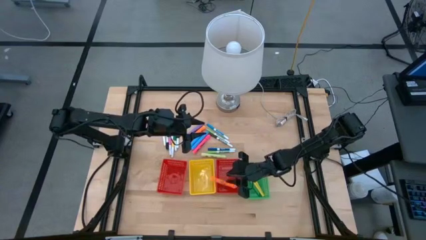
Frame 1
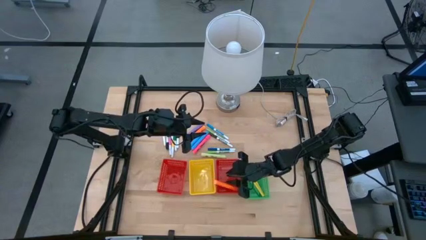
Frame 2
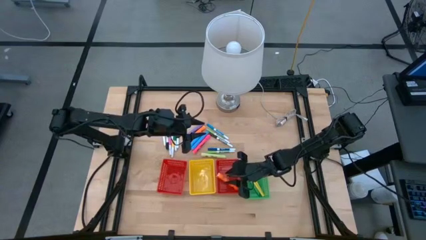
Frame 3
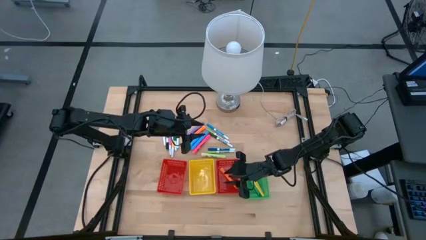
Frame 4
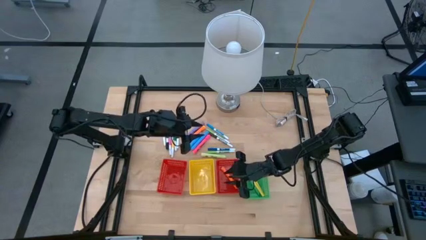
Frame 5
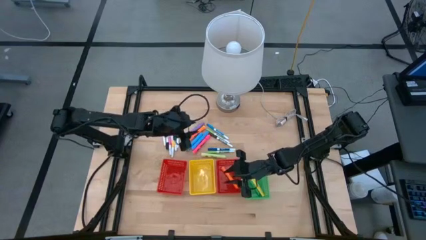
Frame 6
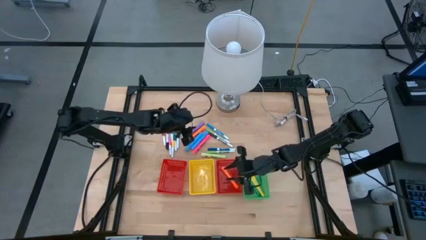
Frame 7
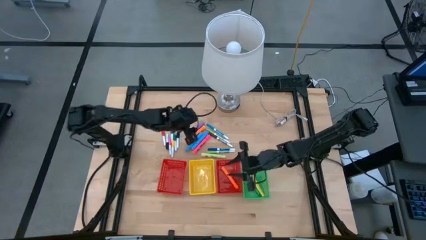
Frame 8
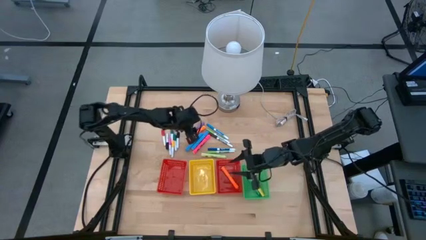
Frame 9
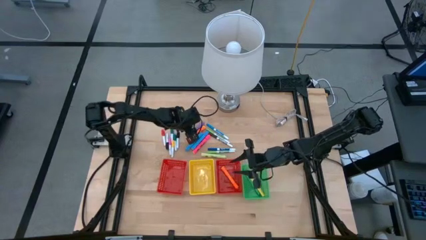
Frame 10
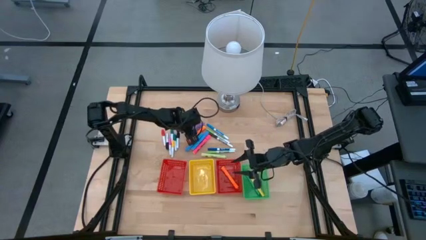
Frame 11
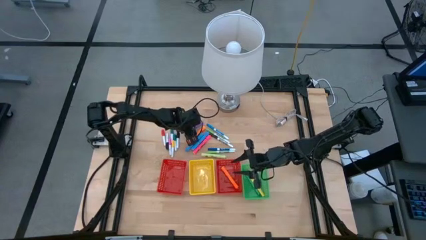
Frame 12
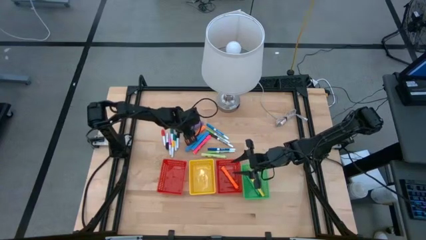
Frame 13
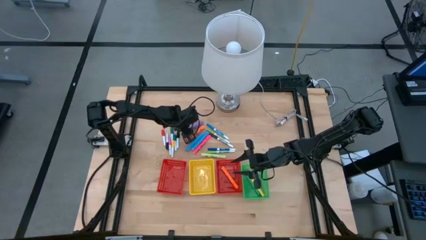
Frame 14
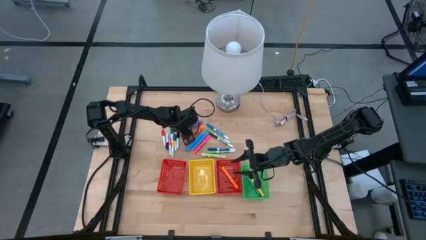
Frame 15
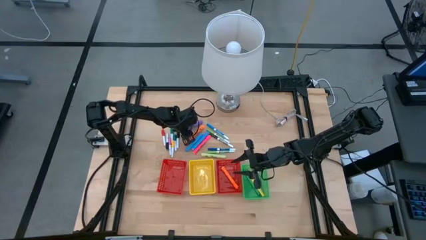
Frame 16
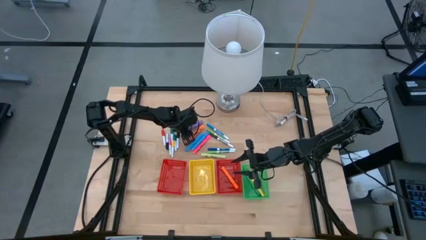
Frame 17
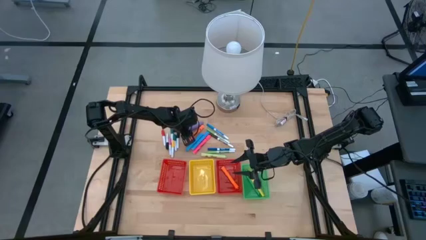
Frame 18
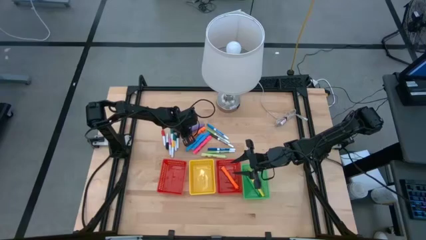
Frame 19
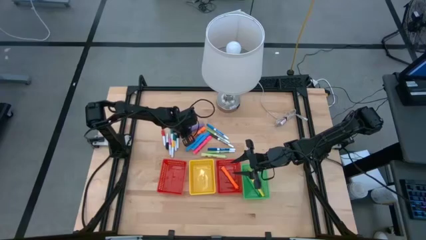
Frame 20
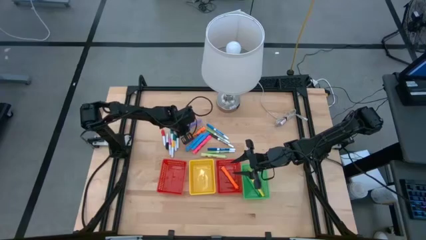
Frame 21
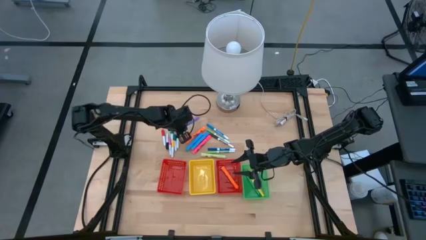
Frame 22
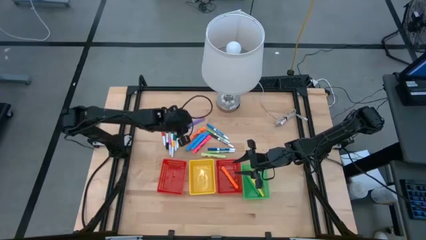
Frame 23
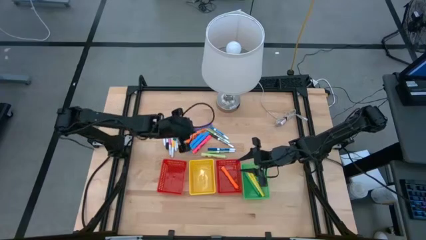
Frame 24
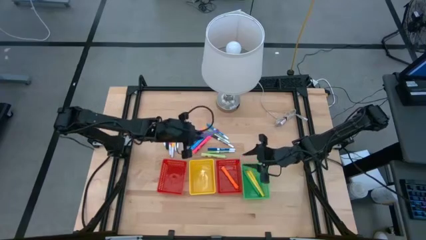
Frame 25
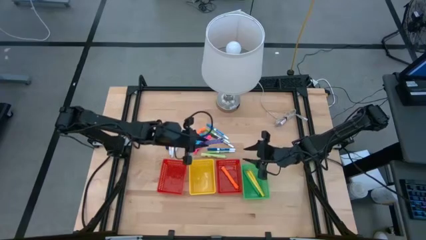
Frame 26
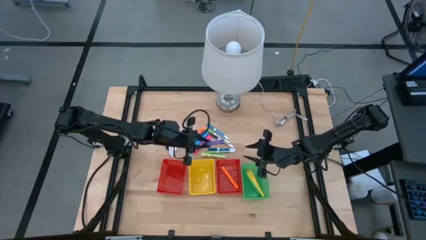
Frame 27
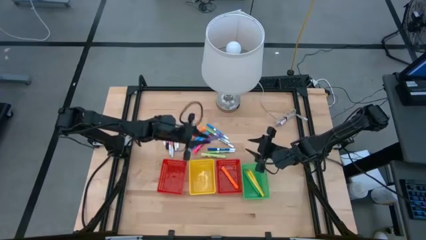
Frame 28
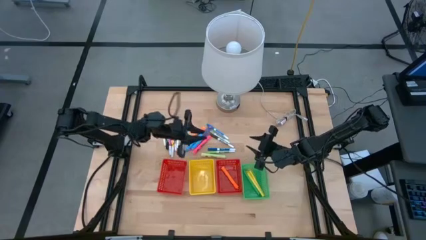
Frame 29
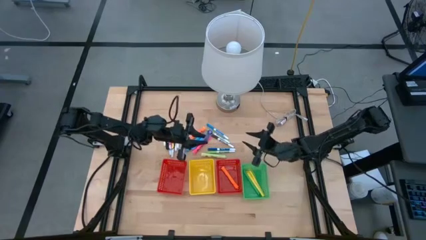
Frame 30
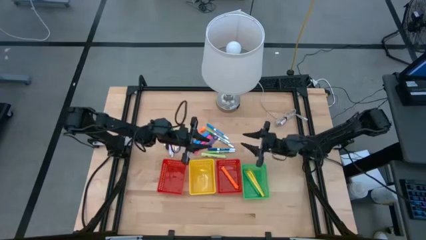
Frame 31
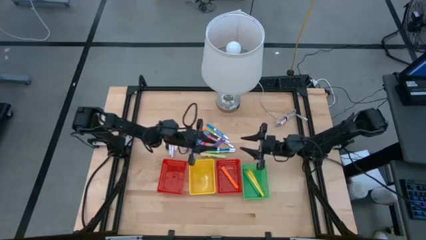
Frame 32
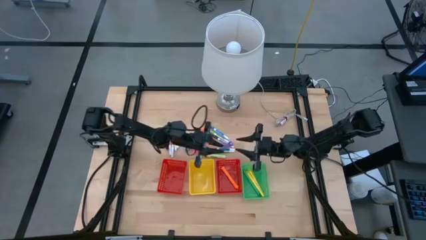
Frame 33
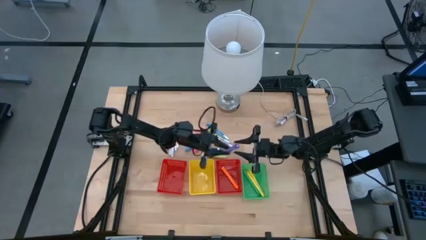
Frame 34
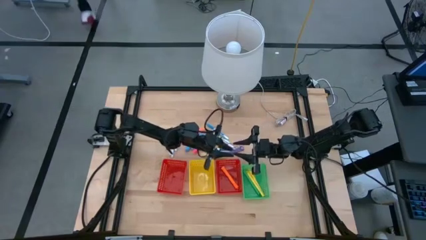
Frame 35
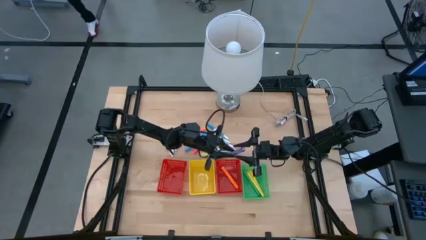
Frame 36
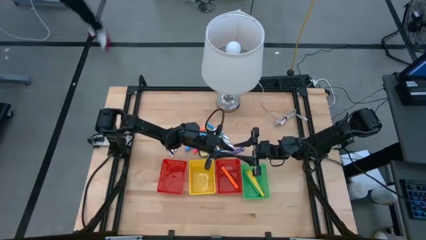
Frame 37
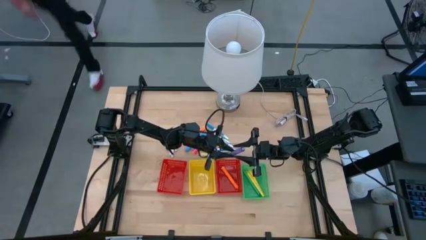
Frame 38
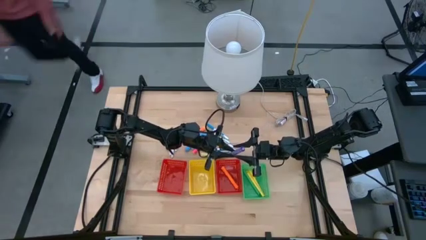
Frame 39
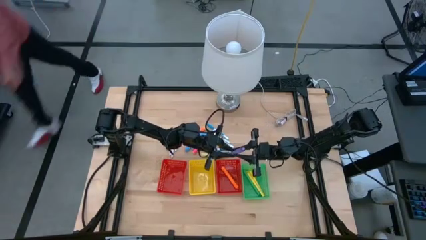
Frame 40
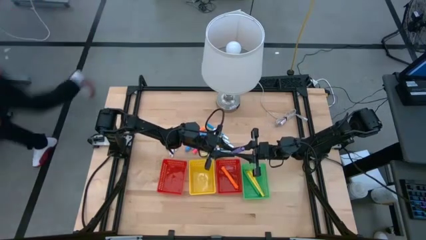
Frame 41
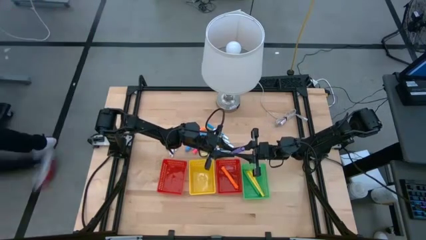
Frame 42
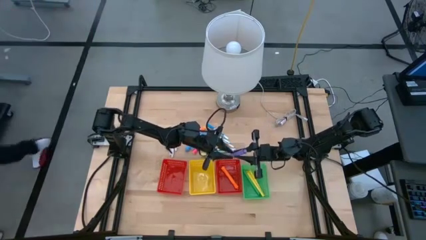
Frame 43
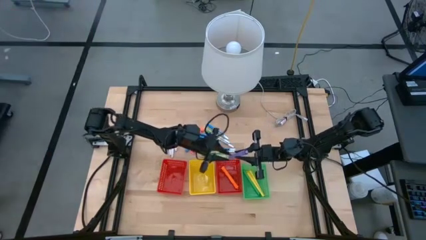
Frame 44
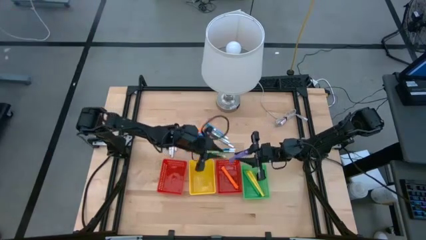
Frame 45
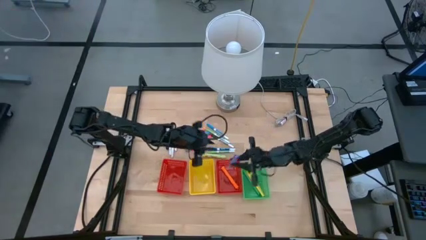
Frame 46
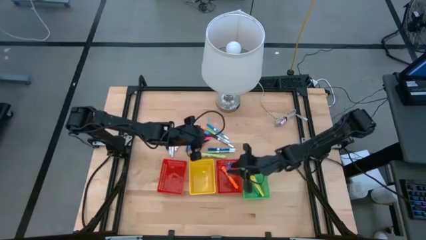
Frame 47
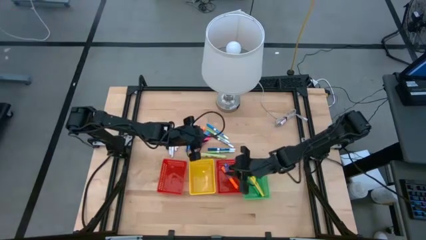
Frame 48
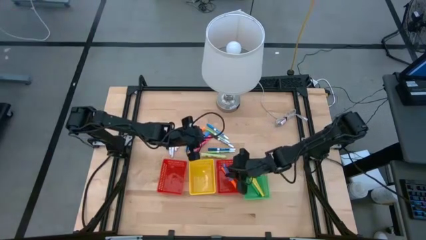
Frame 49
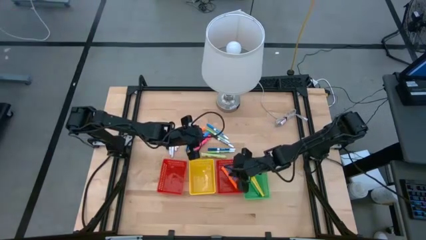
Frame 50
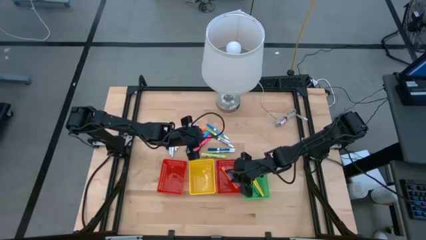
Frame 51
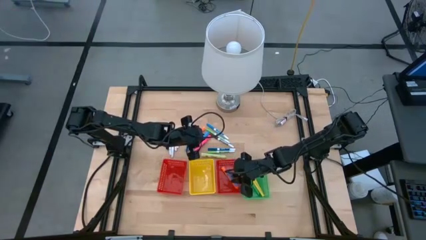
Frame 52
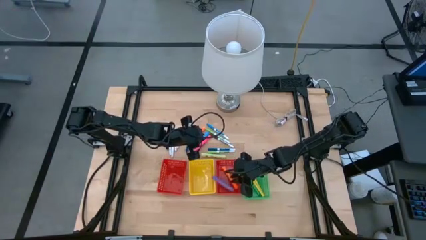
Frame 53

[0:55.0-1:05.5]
Task: Pick & Place Markers
Put the large violet highlighter into the right red bin
